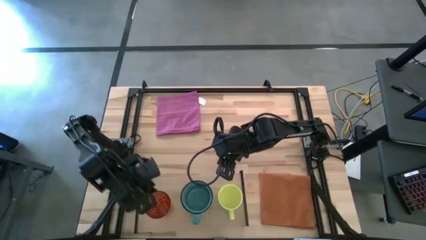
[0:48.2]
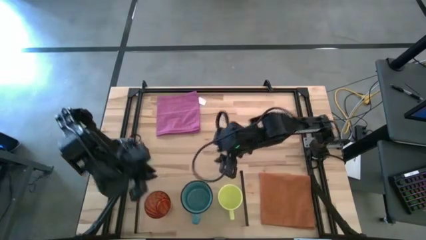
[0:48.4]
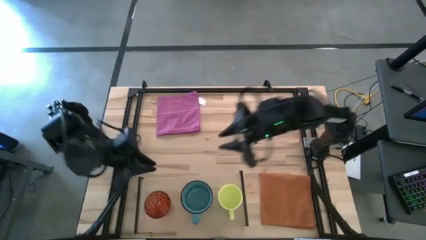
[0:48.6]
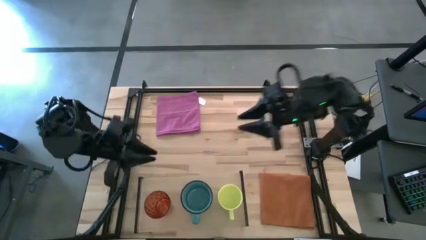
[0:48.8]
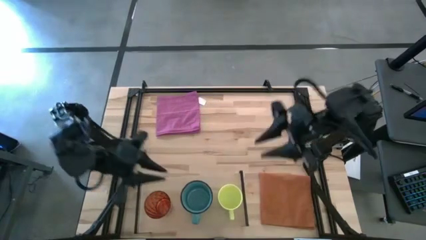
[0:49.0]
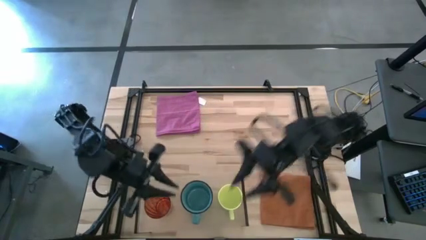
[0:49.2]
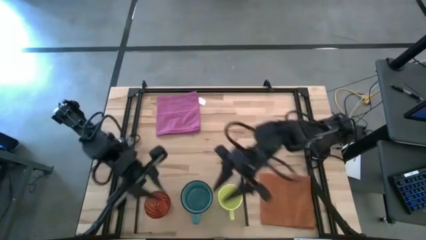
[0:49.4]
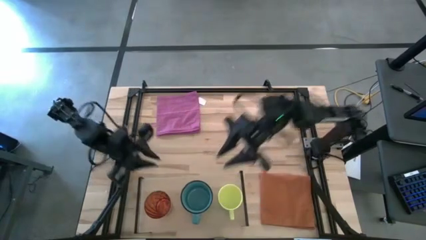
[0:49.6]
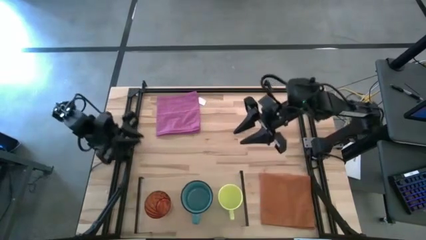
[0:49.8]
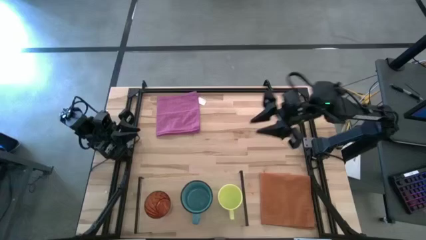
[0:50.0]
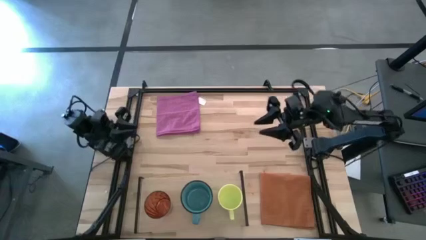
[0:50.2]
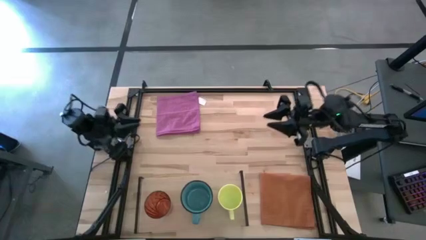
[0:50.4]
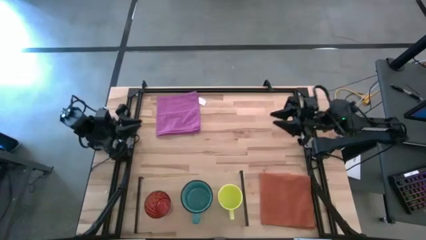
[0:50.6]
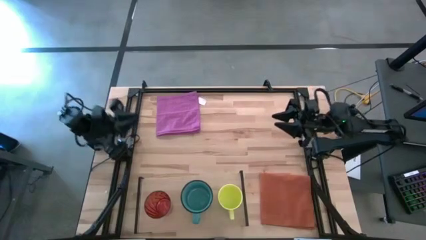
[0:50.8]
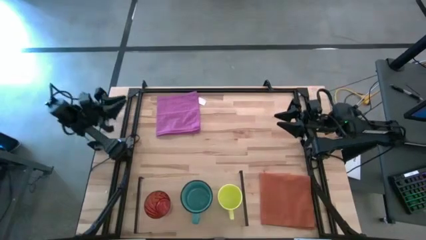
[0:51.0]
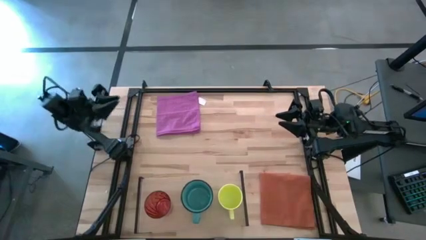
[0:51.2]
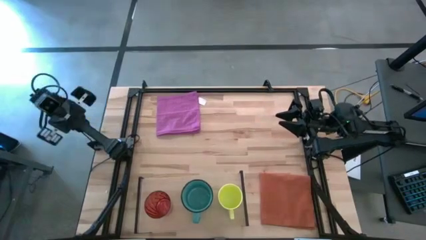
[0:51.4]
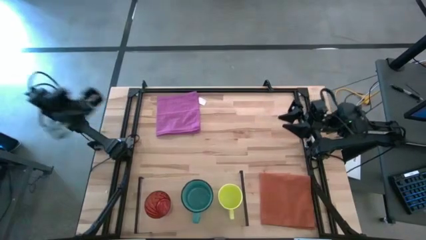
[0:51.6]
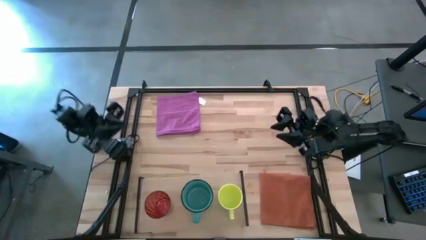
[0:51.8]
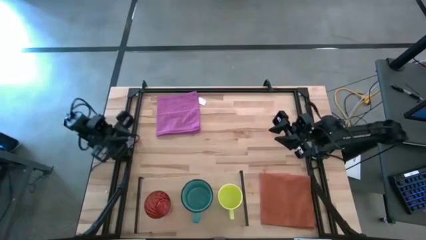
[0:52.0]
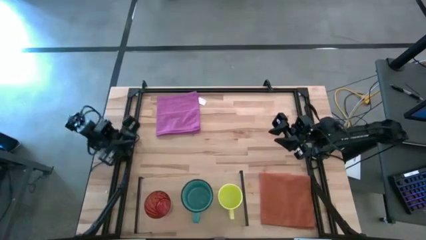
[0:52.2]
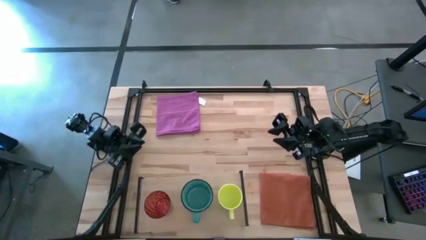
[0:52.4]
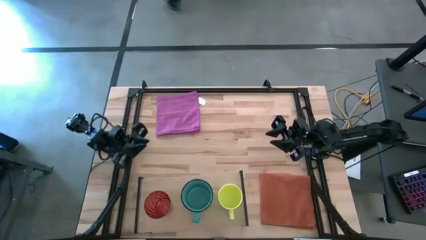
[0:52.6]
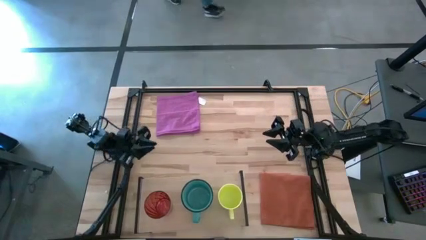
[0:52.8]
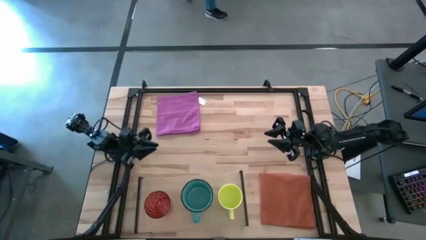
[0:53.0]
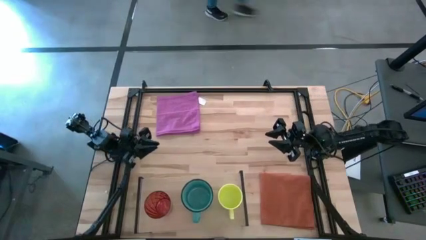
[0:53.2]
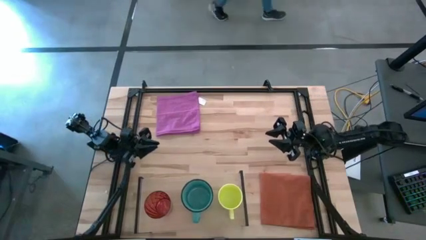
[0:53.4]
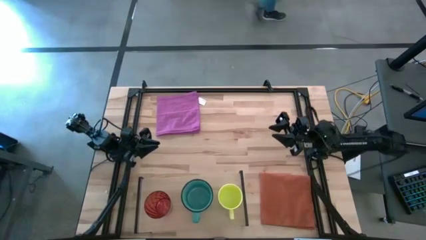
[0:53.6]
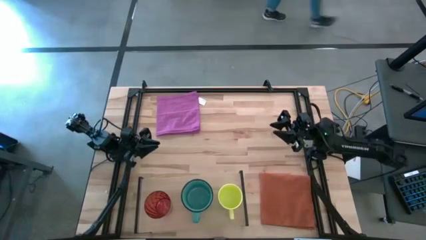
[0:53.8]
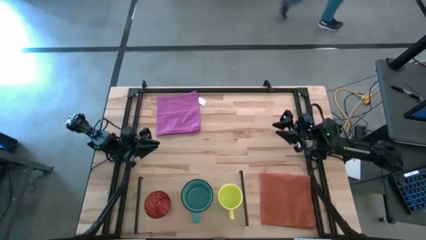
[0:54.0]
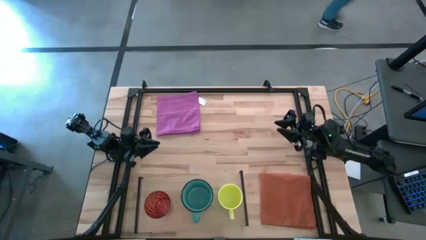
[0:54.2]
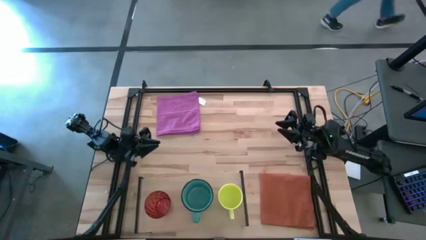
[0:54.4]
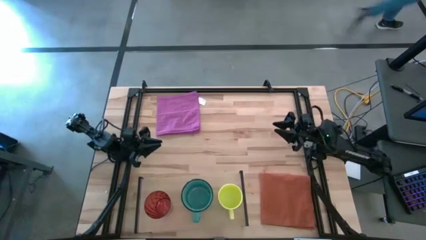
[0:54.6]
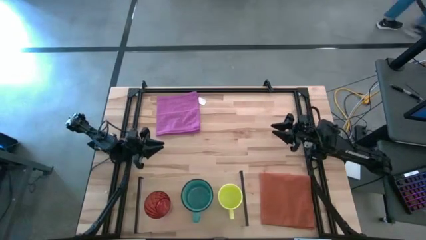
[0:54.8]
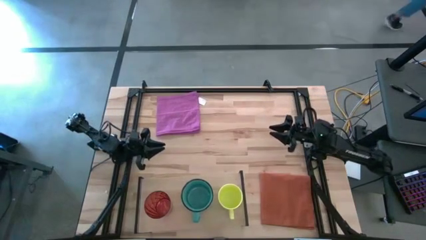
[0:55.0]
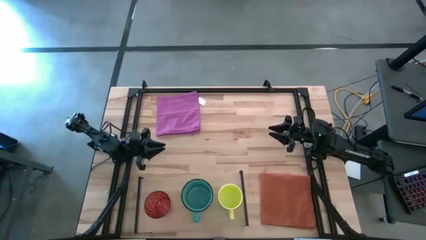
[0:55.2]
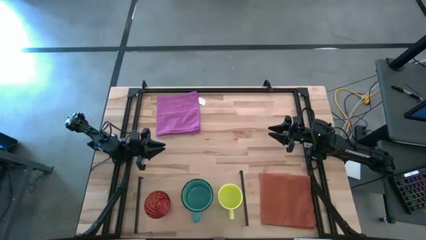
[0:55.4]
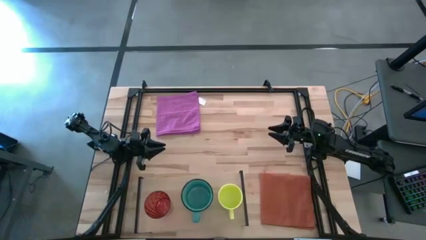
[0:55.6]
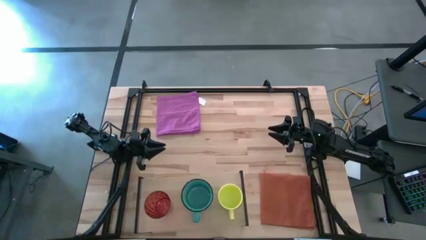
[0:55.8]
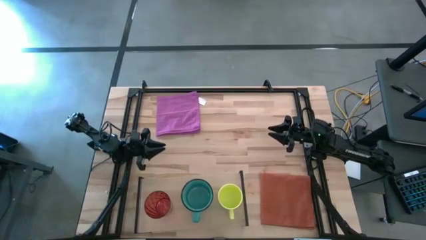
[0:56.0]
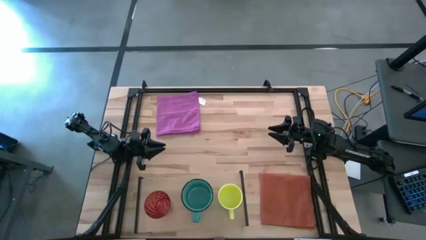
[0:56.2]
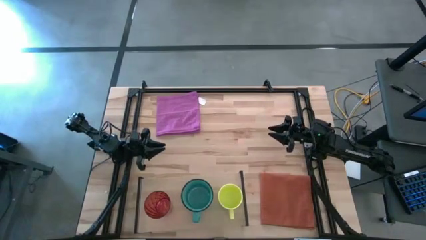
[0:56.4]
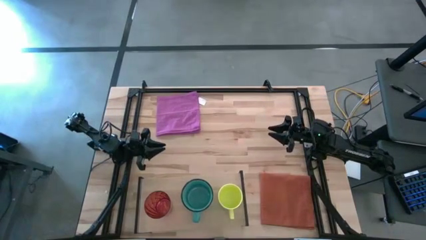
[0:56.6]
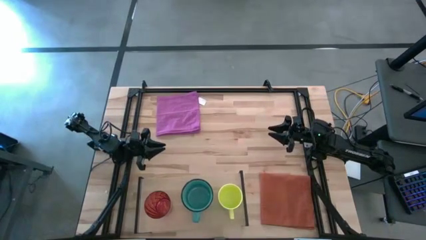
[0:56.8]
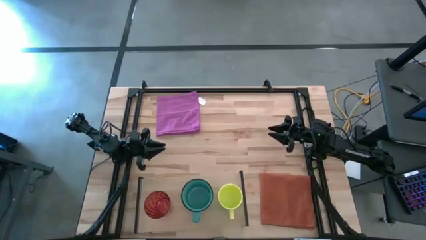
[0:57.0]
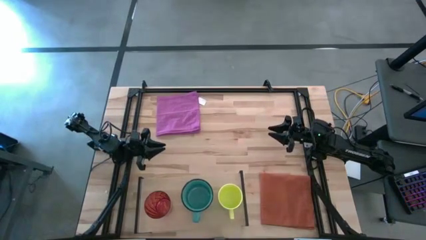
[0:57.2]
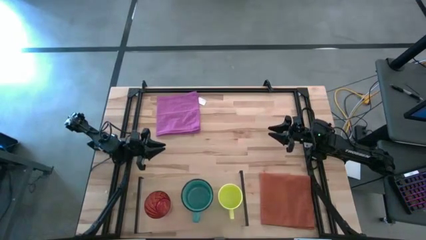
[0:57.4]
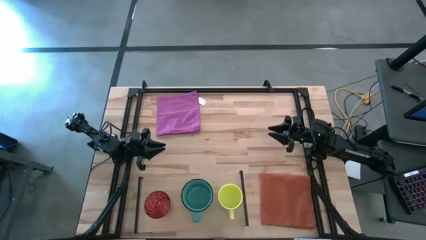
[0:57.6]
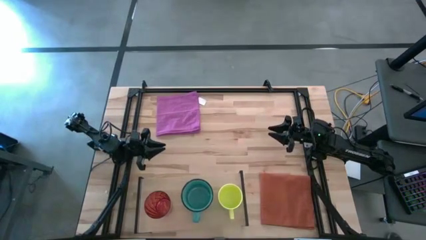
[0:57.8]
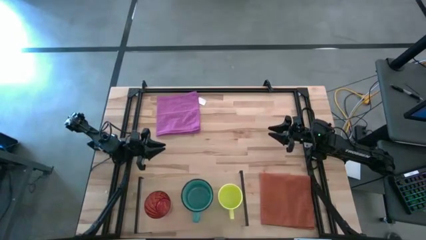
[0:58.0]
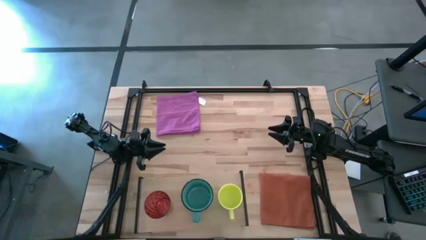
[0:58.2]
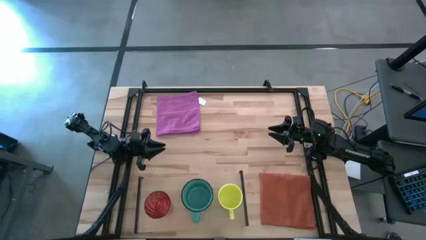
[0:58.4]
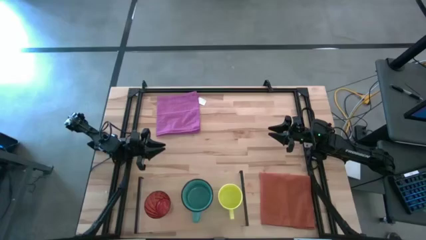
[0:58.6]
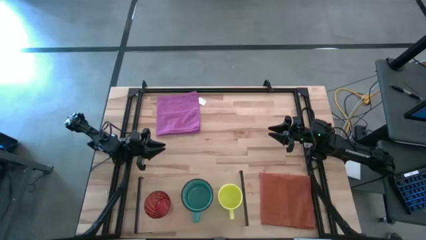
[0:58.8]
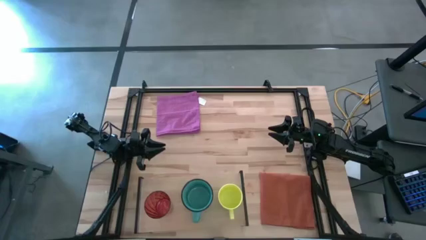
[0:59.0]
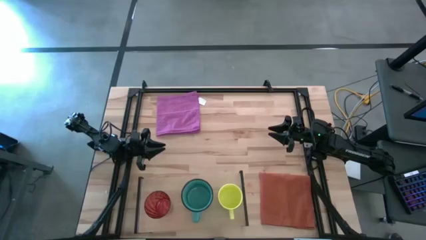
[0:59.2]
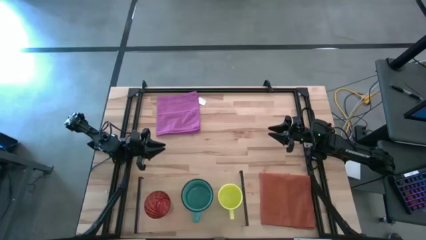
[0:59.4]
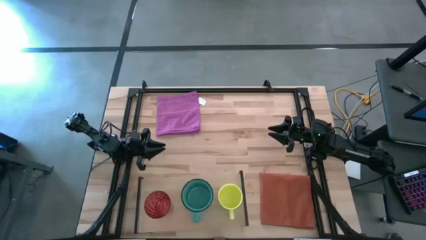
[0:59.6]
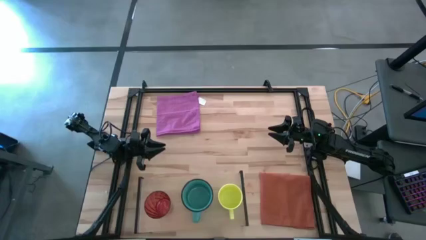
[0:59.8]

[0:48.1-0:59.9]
Task: Stack small to large cups/mugs on shelf
Return to Home Position

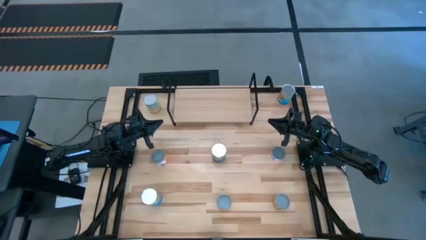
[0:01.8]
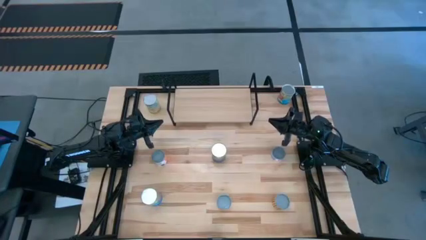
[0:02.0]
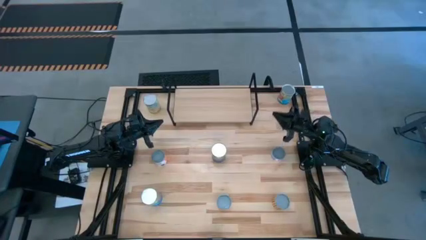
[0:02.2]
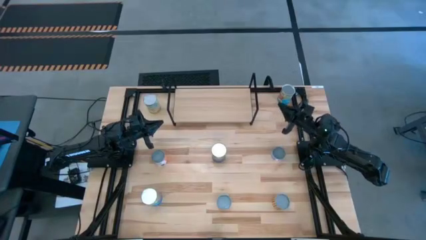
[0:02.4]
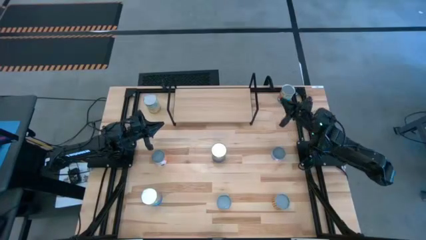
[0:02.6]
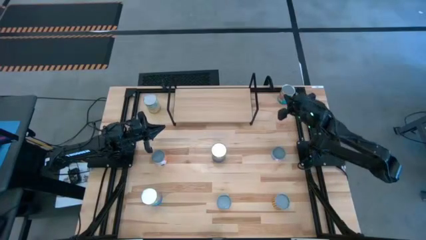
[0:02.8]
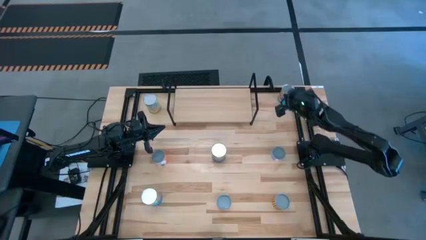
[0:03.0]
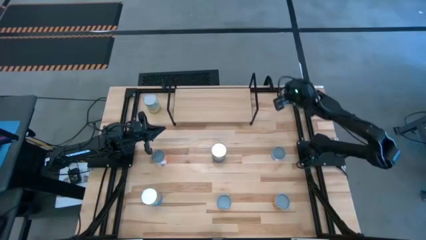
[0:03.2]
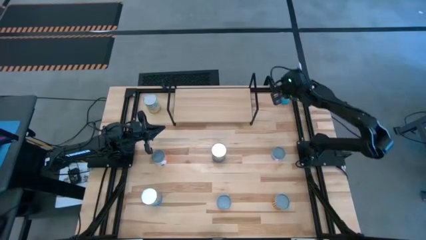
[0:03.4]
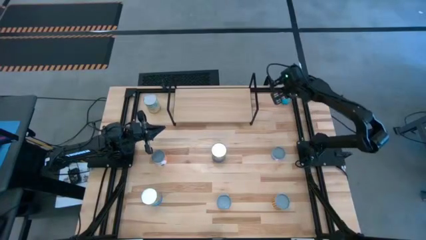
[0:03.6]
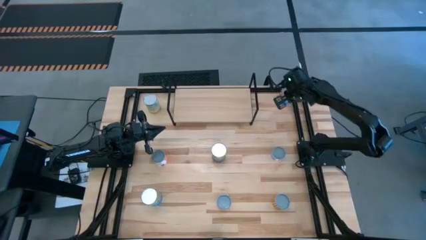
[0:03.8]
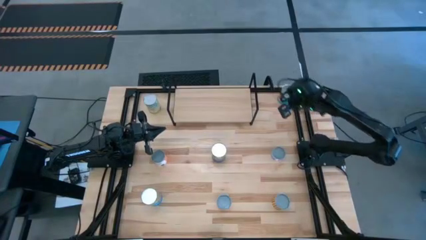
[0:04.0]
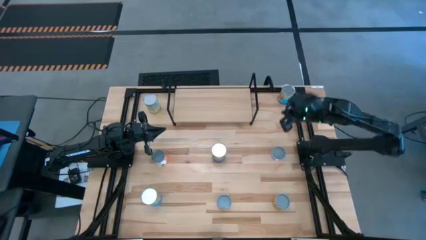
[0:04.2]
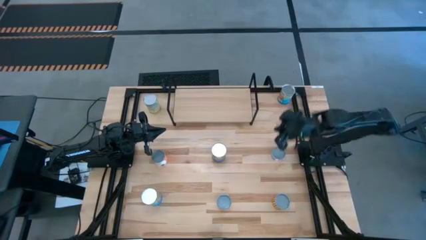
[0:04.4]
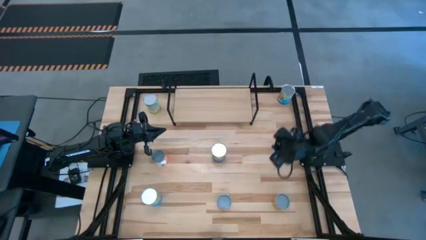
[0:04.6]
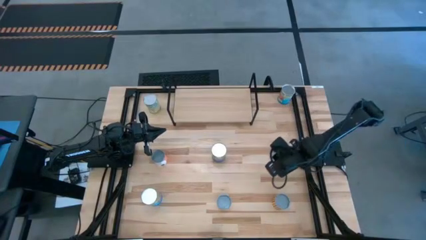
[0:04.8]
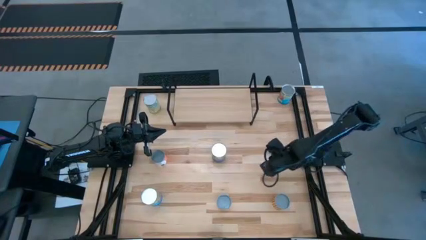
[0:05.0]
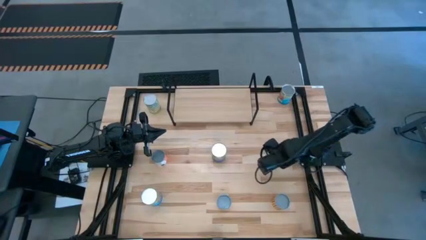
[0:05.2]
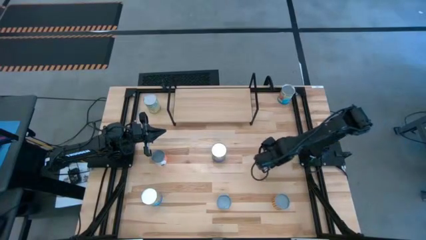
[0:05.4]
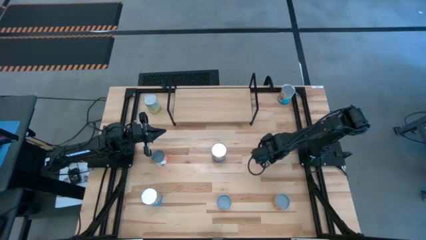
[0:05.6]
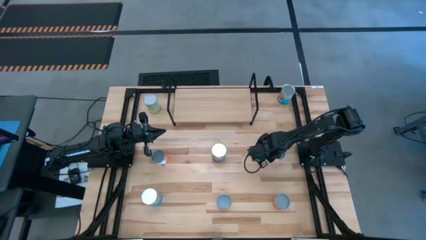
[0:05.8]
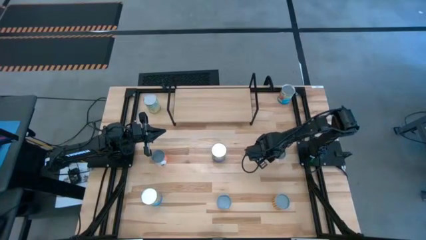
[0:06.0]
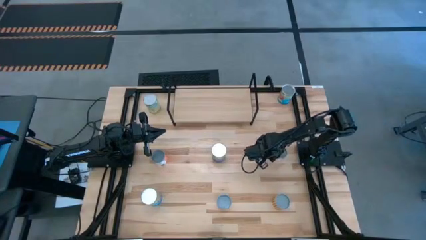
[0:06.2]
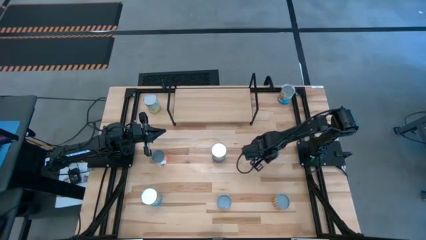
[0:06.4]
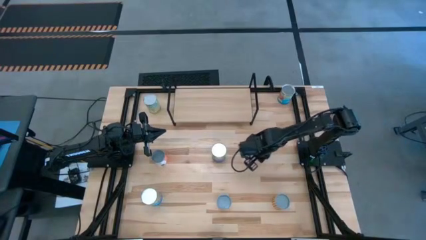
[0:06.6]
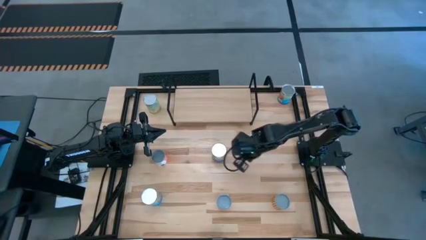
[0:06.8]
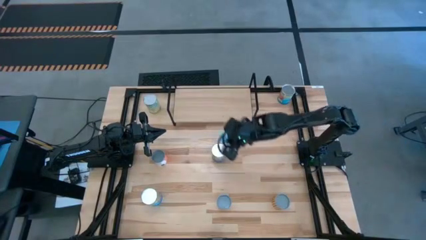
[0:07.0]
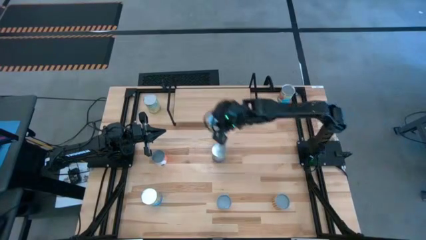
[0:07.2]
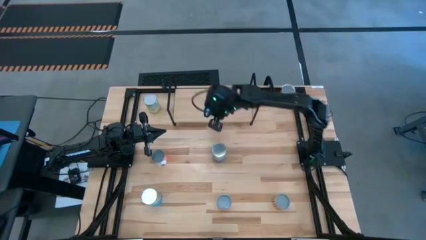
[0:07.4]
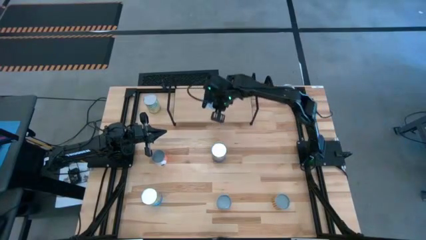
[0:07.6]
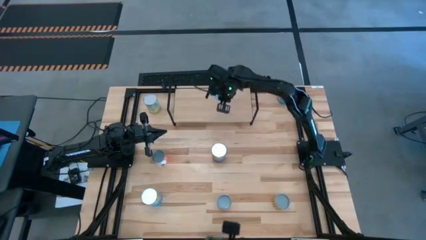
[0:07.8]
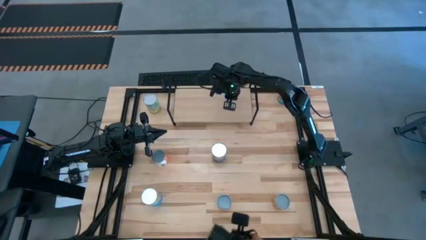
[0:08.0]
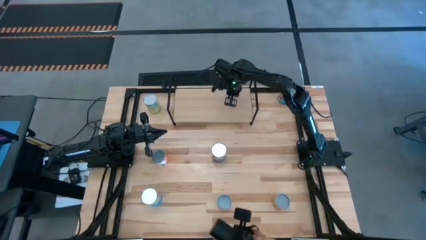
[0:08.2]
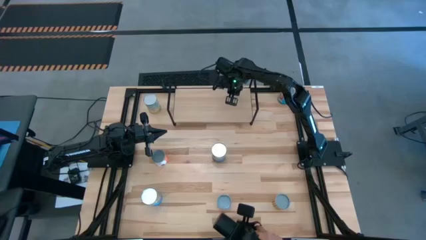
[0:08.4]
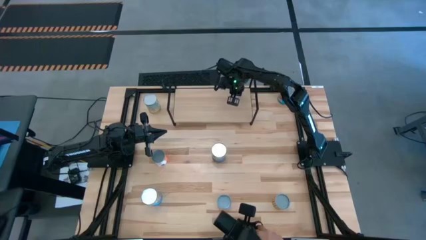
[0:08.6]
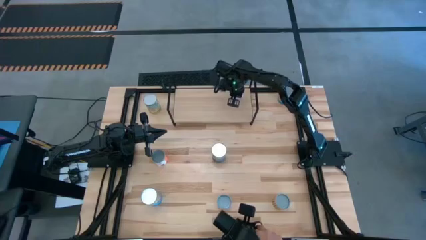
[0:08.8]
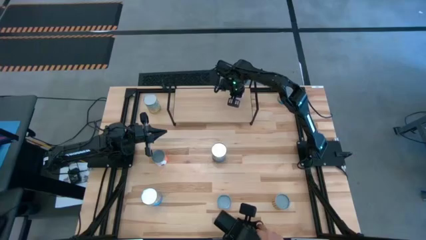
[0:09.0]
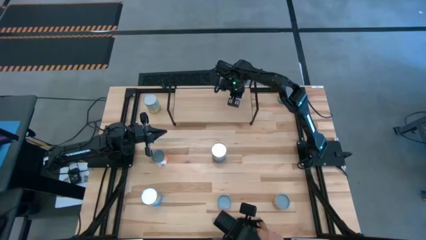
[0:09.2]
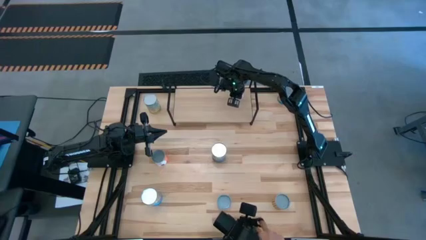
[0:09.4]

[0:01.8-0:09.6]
Task: Pick and place cans onto a shelf
Put the canned tuna on the shelf
